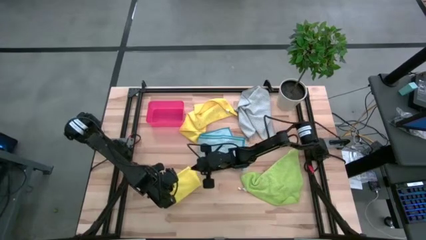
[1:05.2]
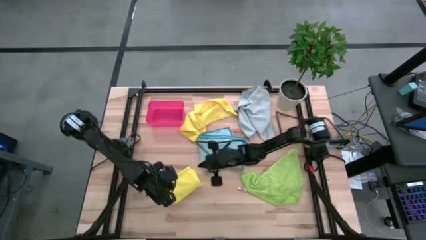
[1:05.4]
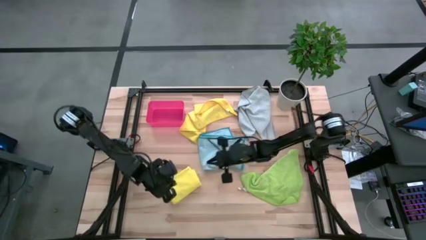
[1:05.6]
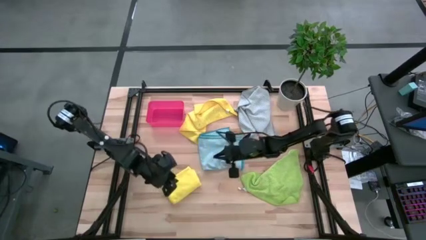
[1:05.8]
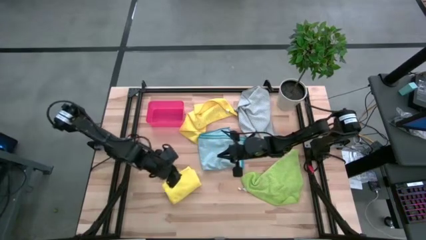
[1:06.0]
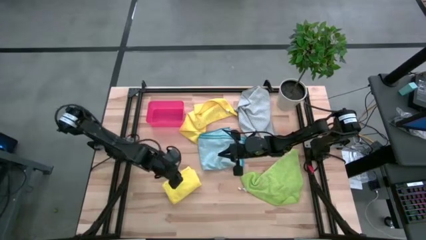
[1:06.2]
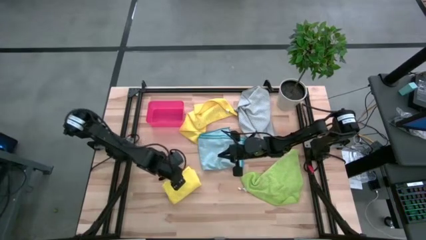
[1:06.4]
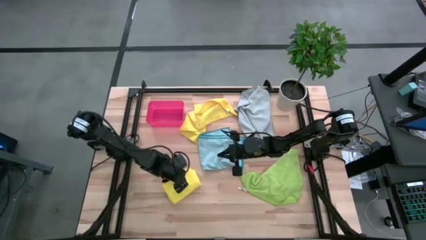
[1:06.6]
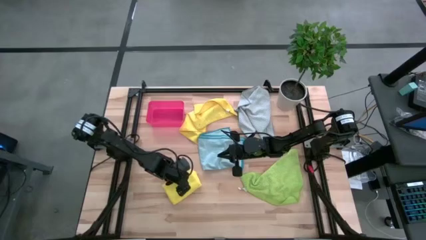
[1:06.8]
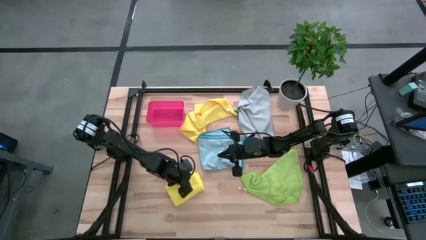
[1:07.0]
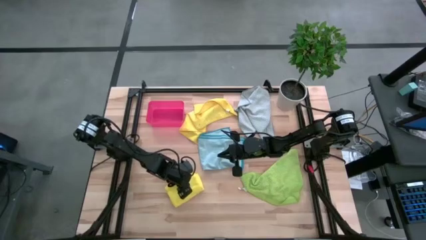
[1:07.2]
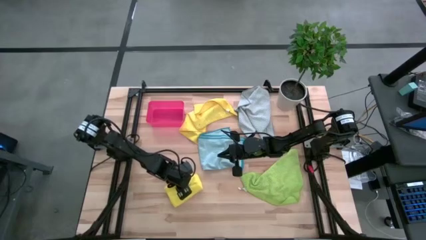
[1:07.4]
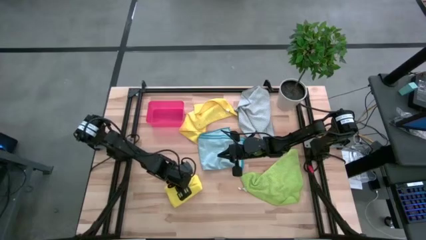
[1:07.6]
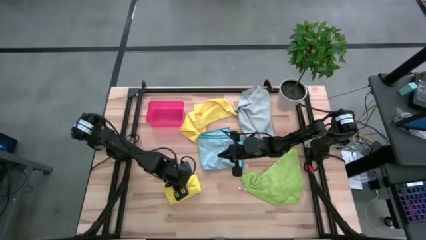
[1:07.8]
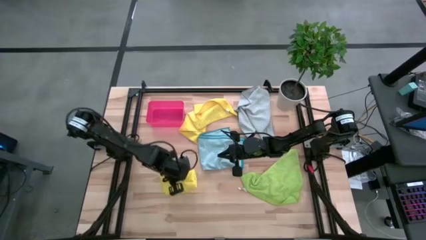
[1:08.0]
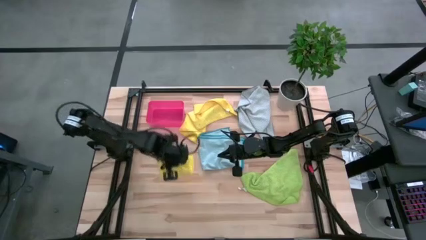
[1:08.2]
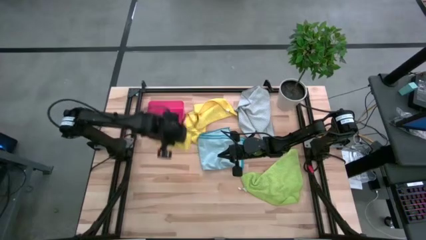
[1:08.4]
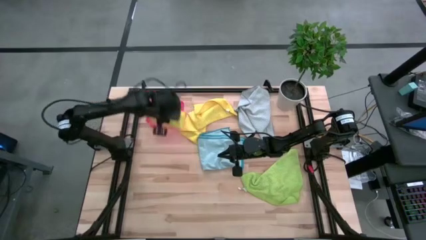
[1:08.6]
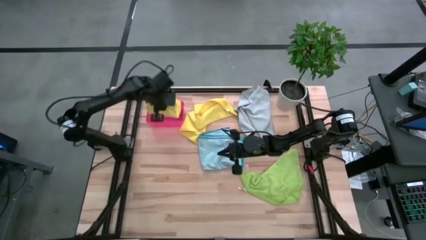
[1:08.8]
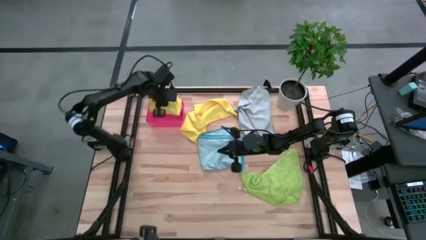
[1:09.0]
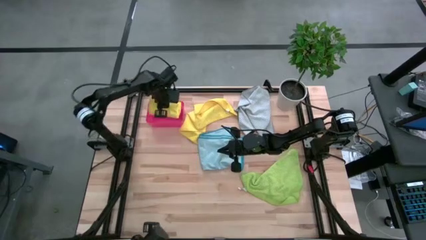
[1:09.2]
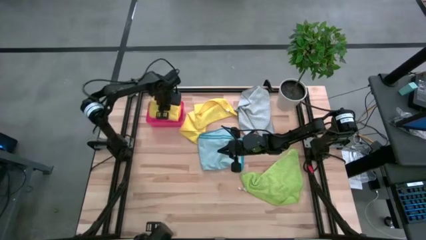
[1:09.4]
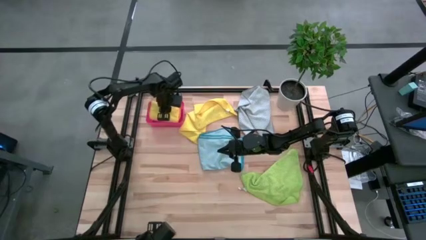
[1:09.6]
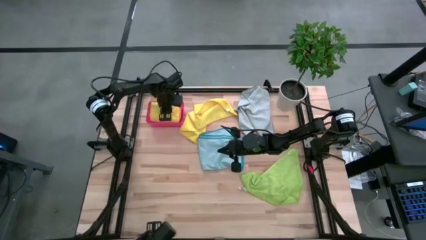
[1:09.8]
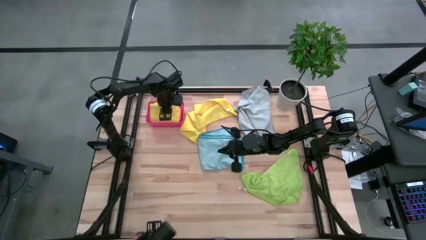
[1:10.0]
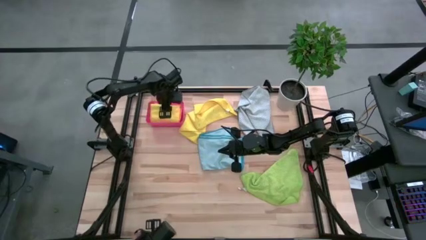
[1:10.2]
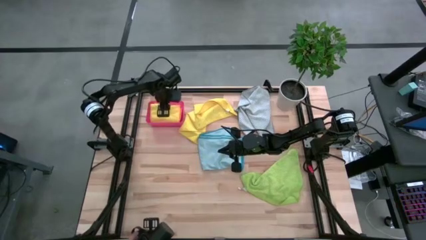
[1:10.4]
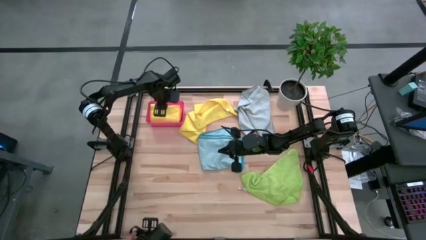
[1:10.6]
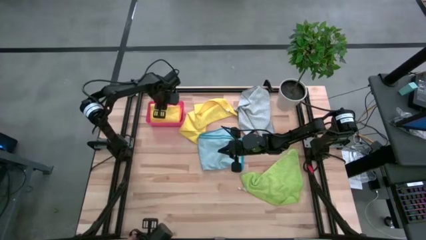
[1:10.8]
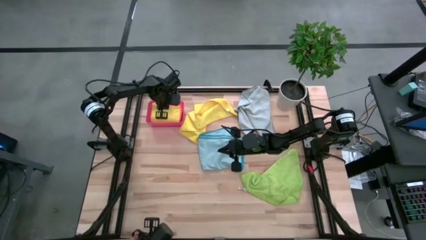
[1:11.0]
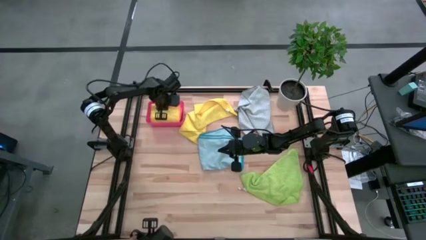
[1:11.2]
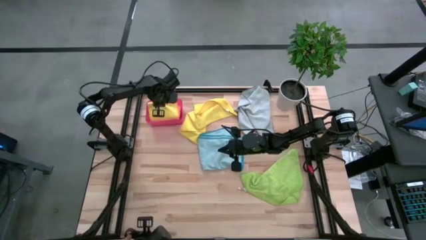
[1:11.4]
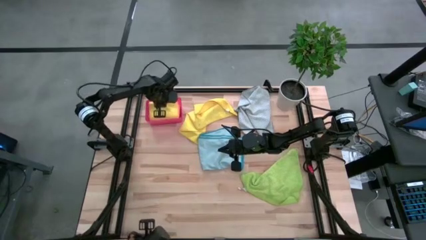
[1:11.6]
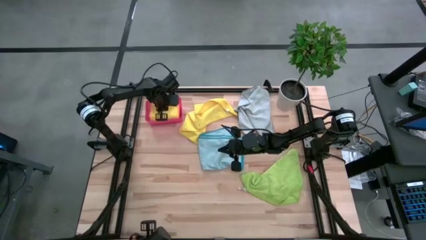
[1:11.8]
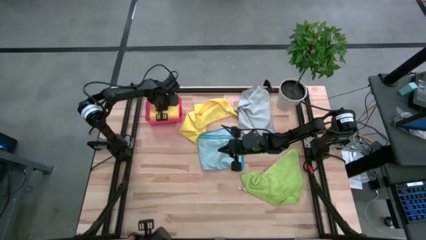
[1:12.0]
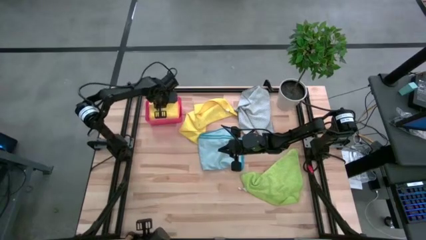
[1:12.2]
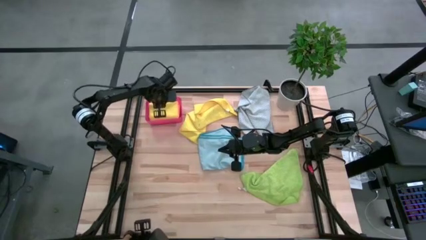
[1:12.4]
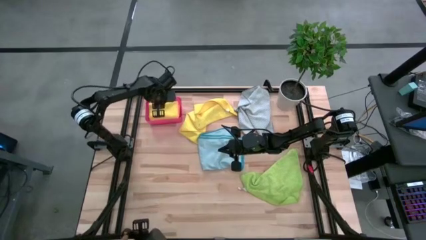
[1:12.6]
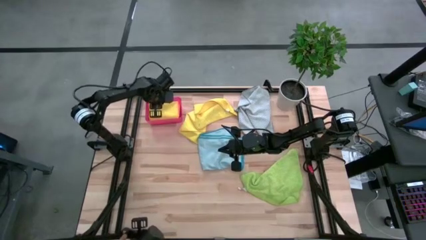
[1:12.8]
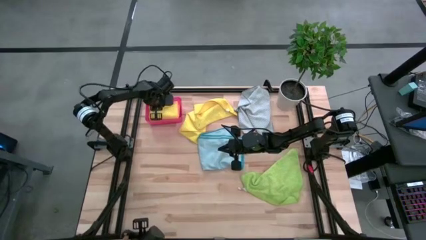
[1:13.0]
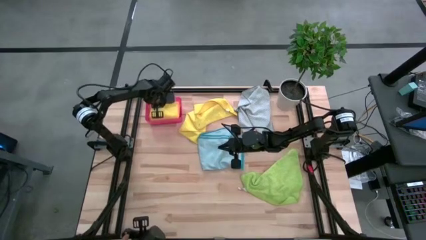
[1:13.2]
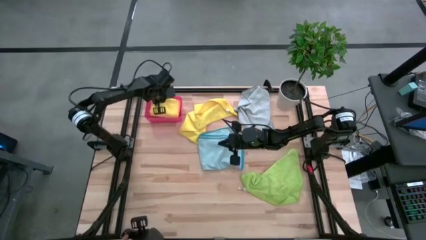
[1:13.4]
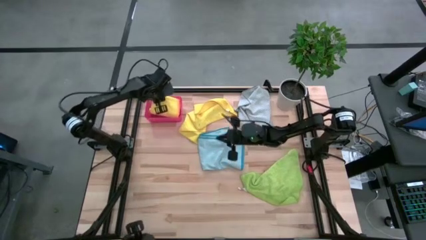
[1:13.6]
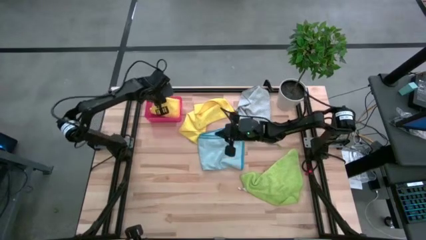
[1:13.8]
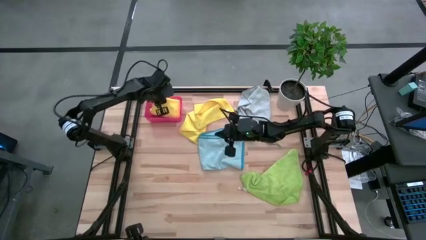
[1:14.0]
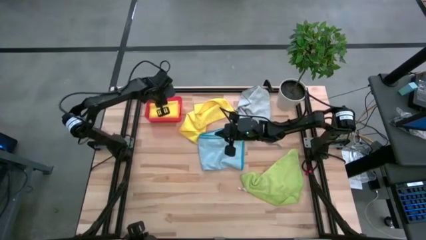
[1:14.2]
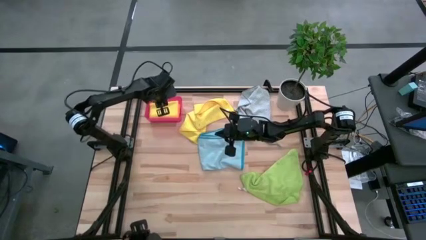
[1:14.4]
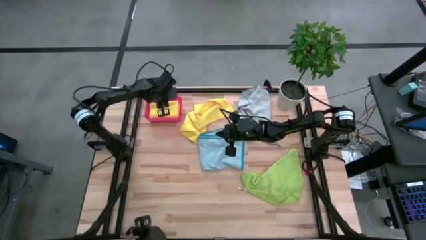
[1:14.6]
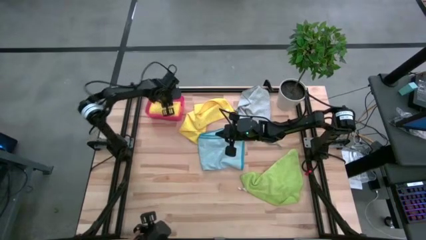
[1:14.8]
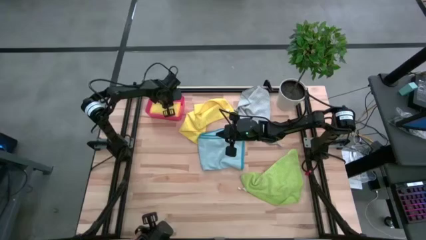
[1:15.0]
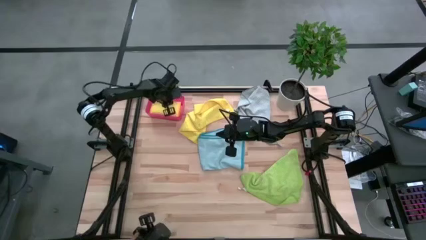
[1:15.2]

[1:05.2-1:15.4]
Task: Fold microfiber towels
Put the folded yellow microfiber cloth into the red bin

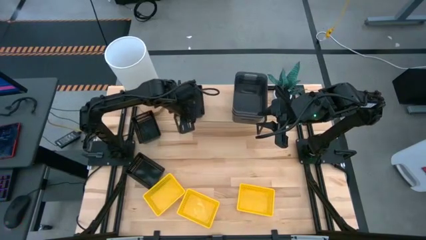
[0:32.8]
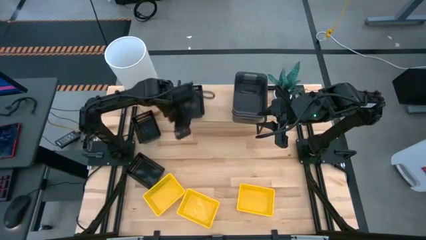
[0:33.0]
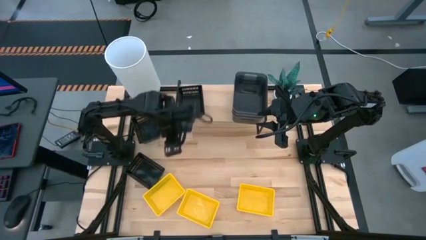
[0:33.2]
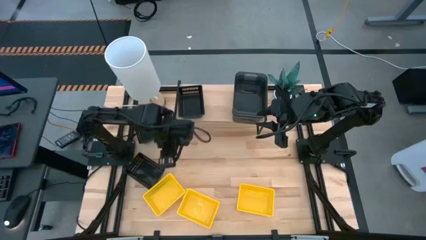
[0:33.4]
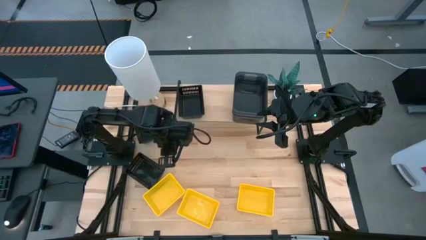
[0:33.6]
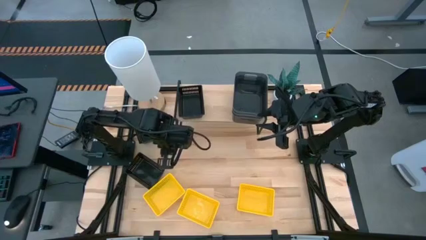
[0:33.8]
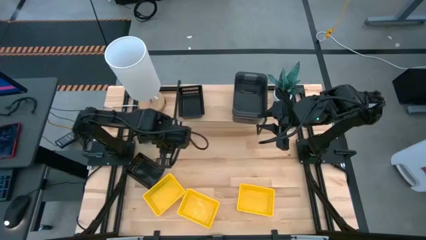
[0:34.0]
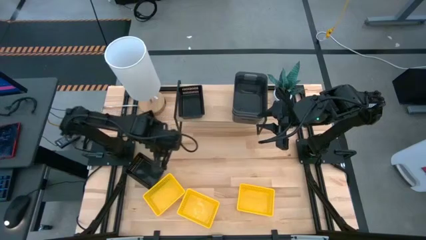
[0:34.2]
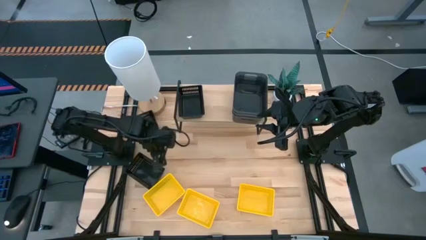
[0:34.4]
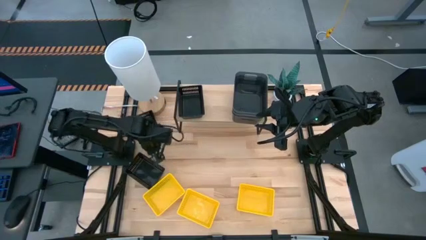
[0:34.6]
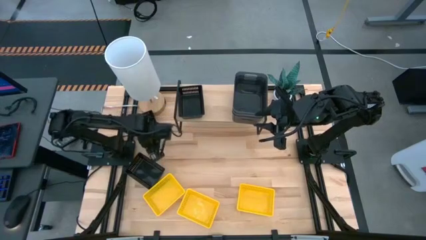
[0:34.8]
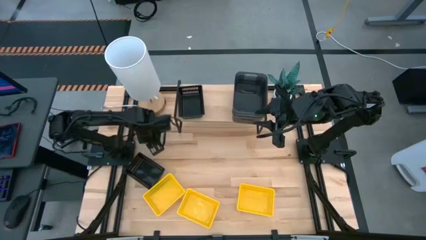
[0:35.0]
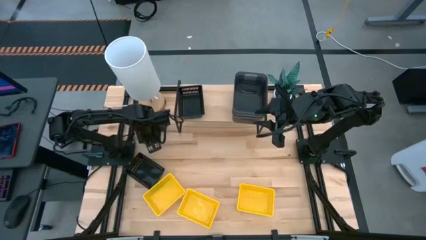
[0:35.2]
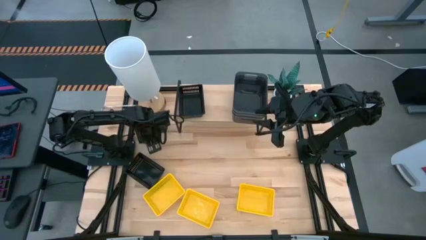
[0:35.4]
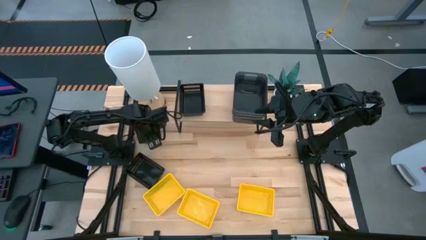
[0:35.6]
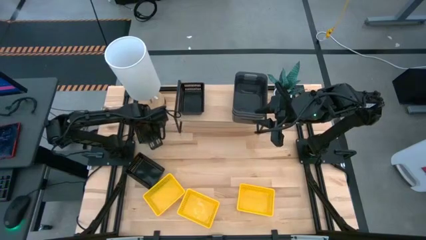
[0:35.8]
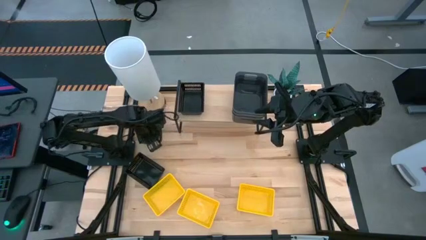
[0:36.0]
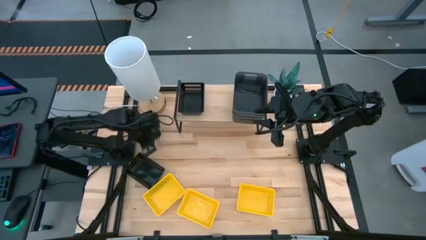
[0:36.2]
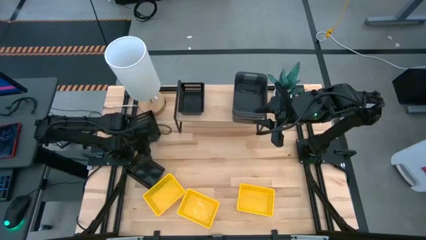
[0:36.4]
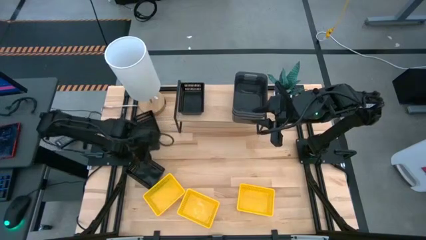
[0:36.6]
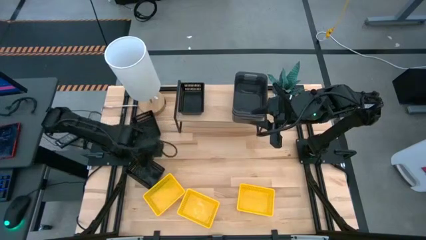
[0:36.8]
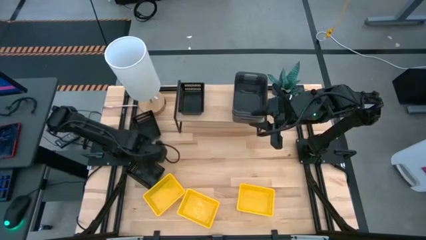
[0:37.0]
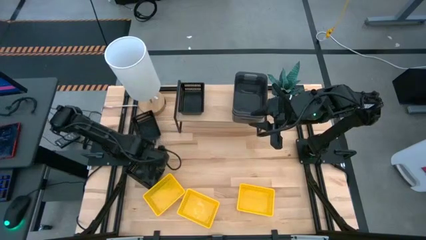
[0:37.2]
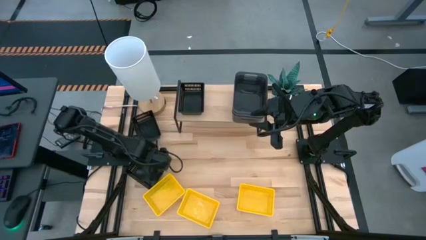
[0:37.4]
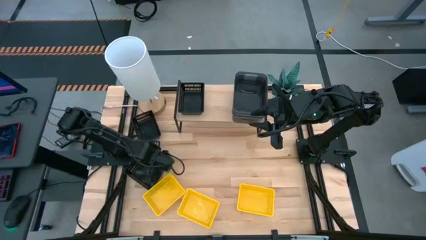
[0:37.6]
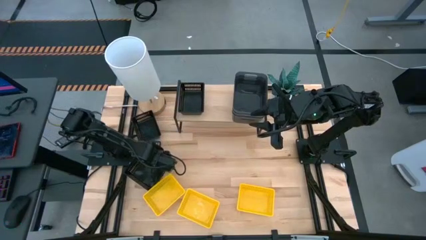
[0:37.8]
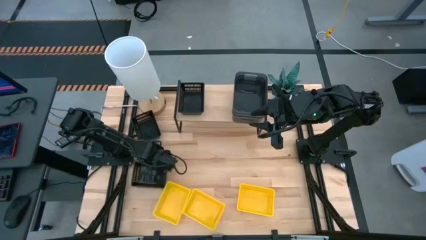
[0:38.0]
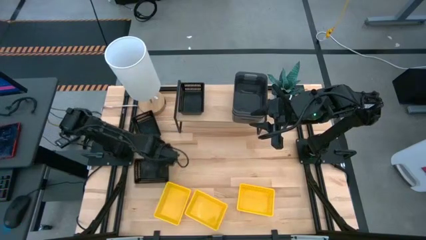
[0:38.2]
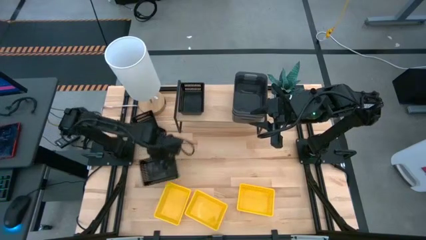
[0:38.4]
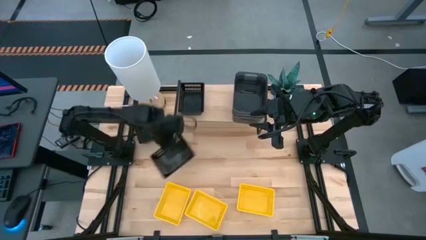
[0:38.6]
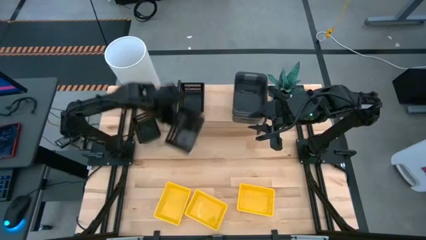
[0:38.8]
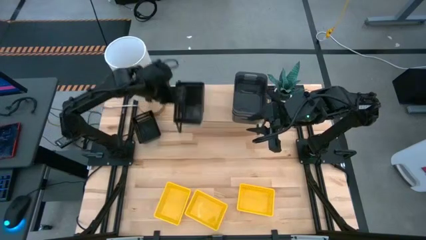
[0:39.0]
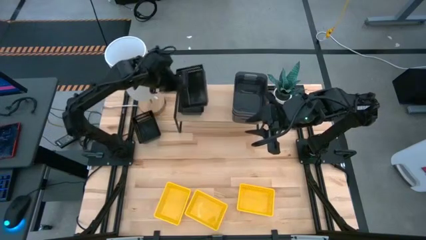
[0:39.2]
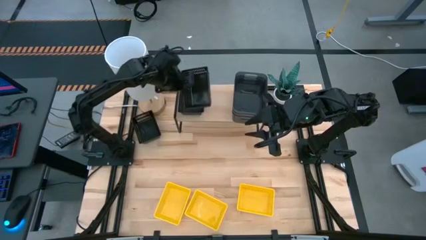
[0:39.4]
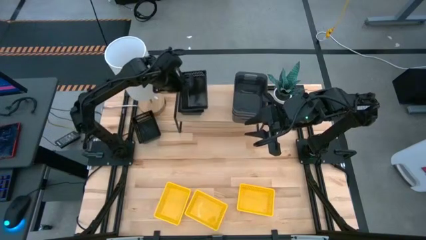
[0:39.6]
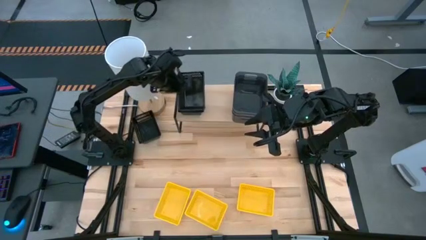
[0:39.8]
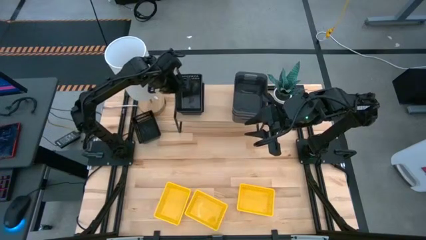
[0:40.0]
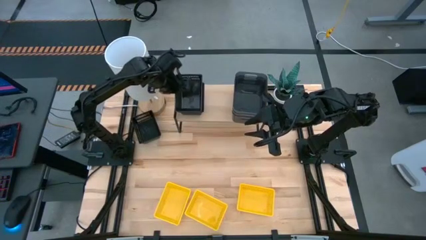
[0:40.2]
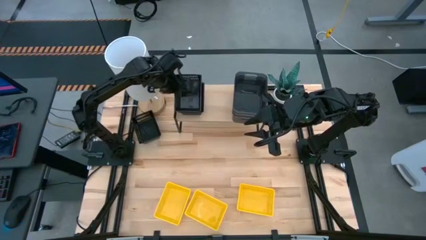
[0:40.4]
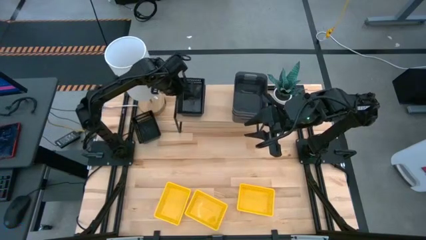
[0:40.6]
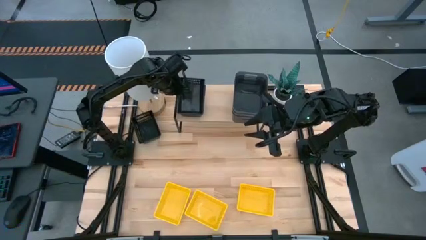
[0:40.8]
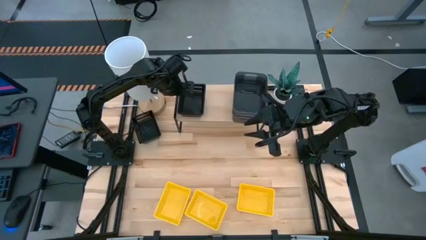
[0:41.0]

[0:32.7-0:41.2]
Task: Stack baskets on shelf by color
Stack the bottom black basket on top of the black basket on the shelf
